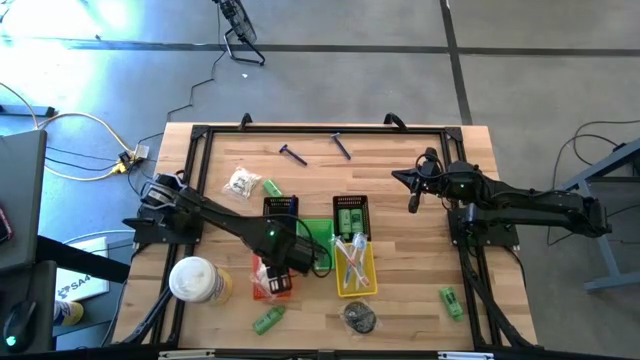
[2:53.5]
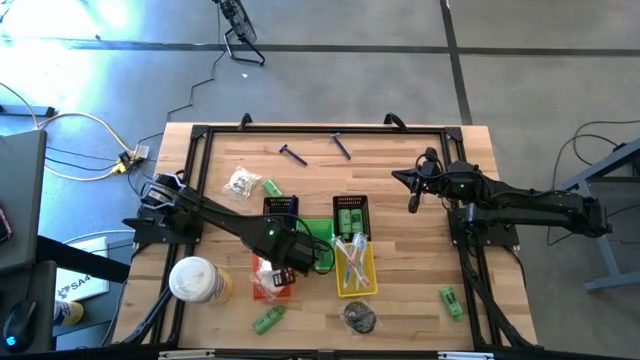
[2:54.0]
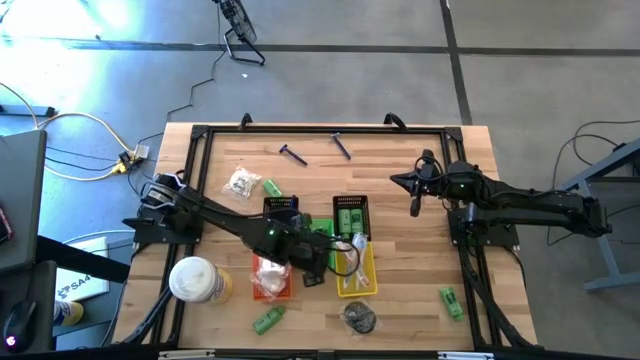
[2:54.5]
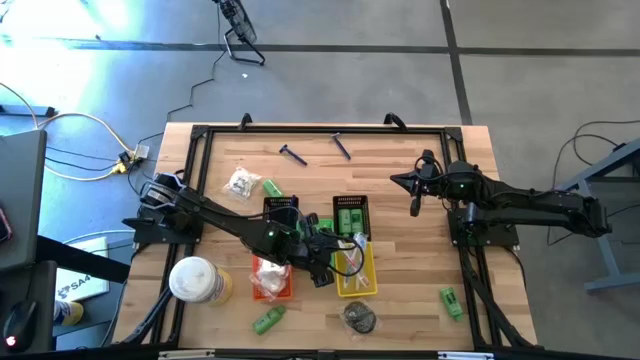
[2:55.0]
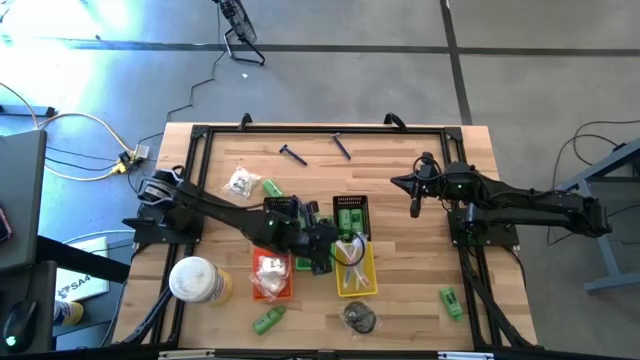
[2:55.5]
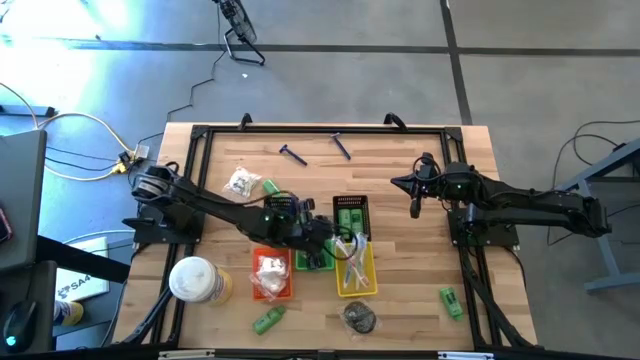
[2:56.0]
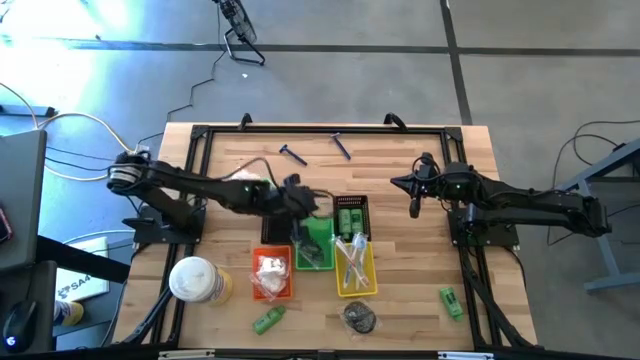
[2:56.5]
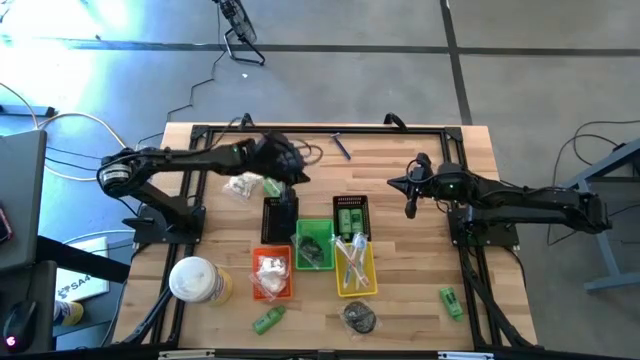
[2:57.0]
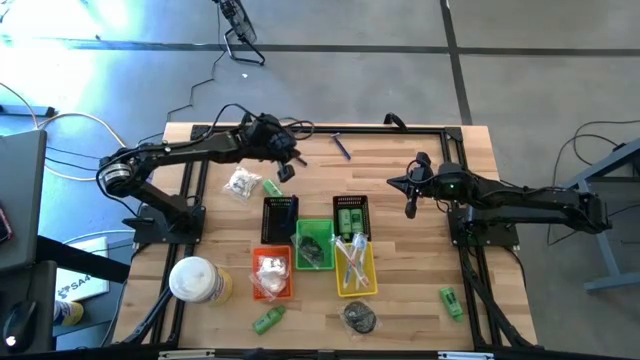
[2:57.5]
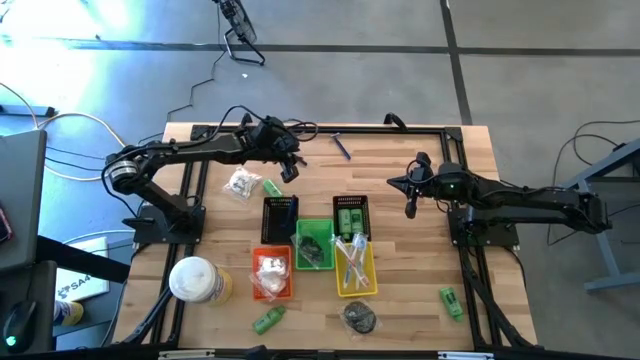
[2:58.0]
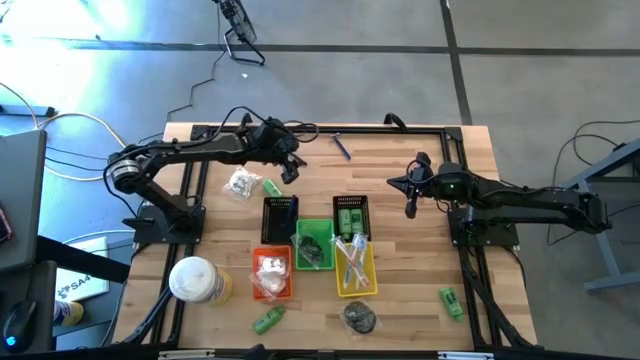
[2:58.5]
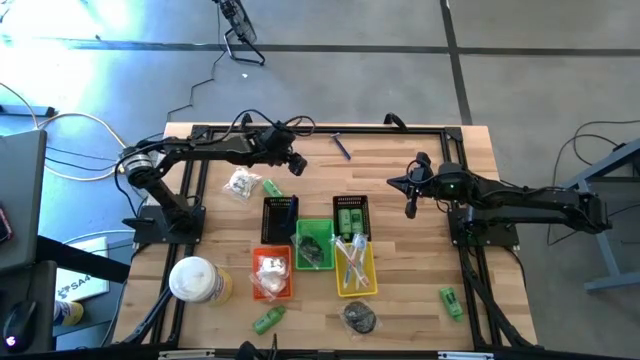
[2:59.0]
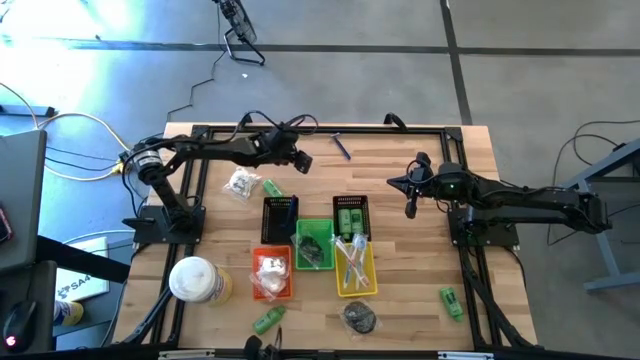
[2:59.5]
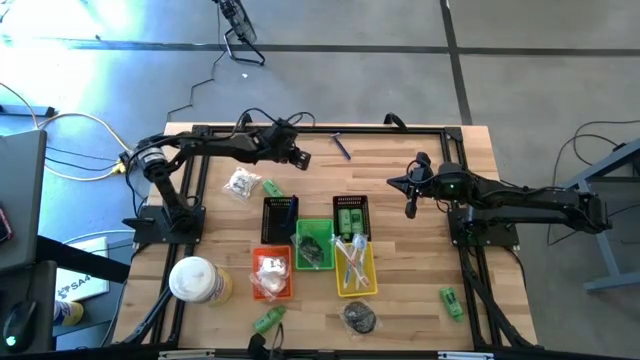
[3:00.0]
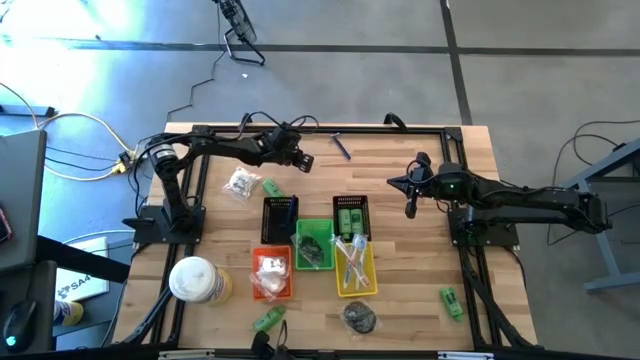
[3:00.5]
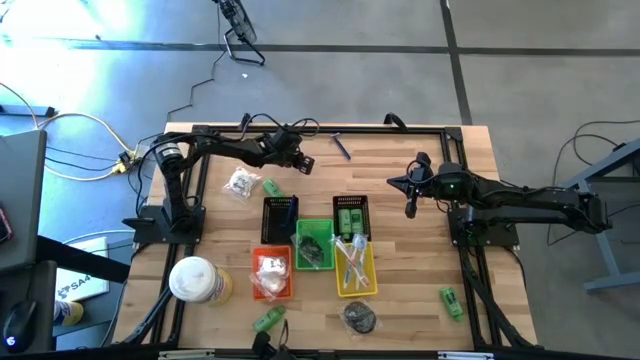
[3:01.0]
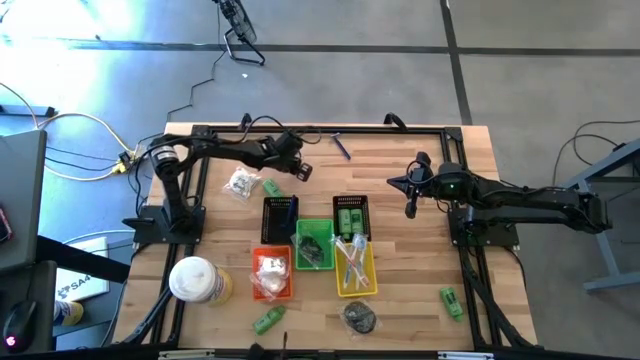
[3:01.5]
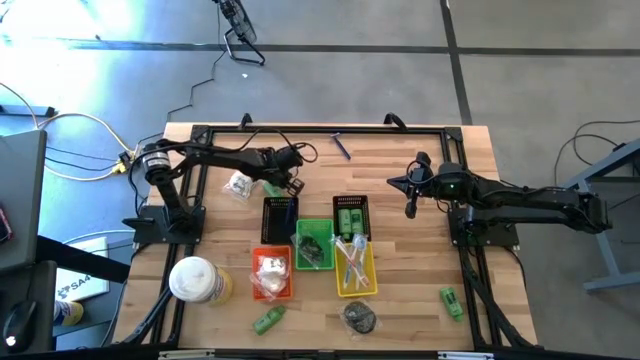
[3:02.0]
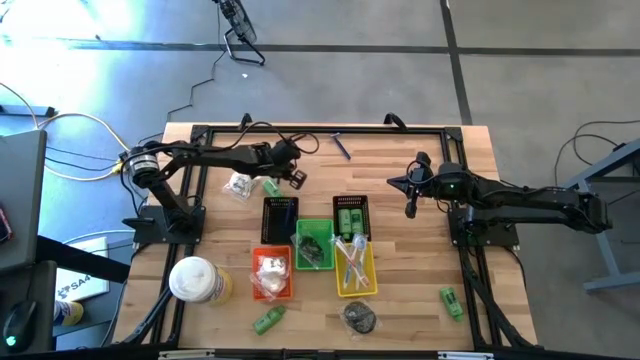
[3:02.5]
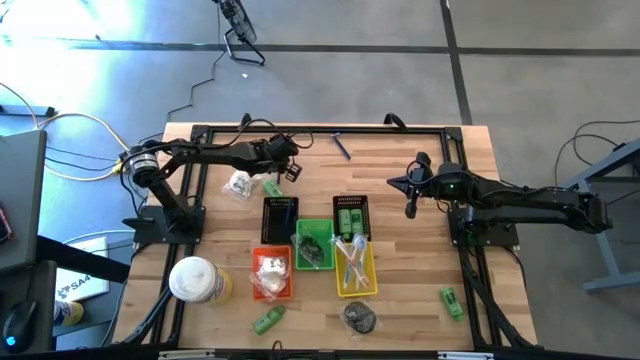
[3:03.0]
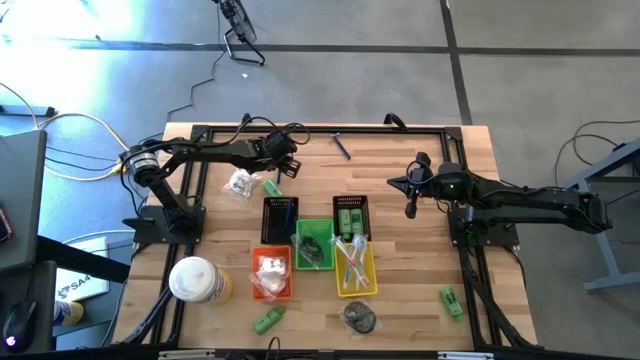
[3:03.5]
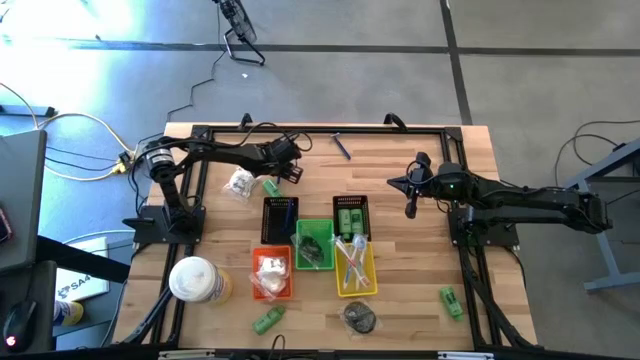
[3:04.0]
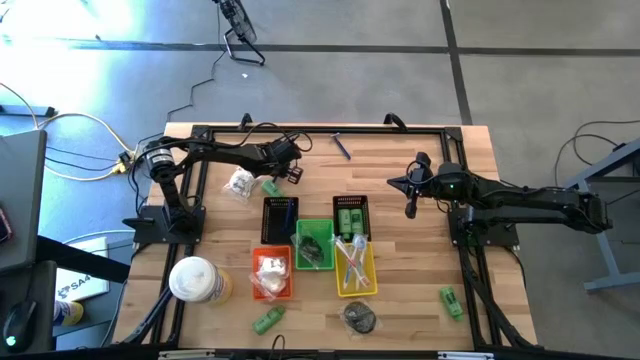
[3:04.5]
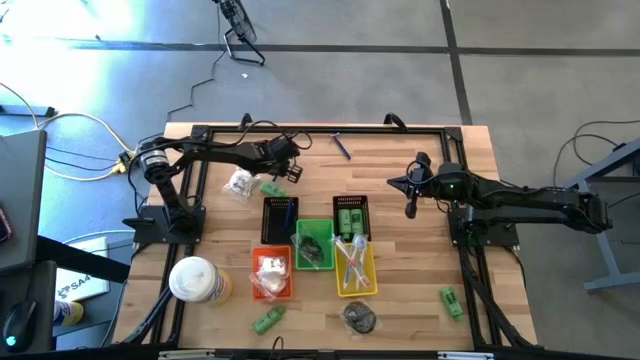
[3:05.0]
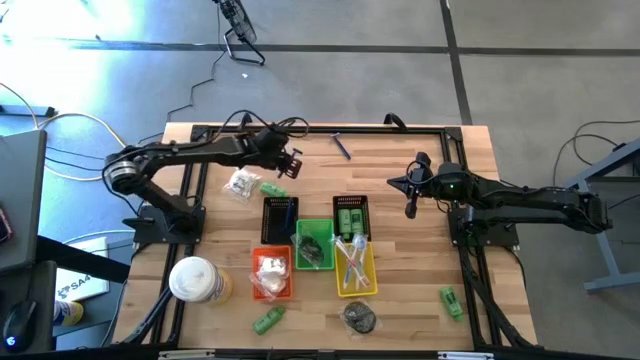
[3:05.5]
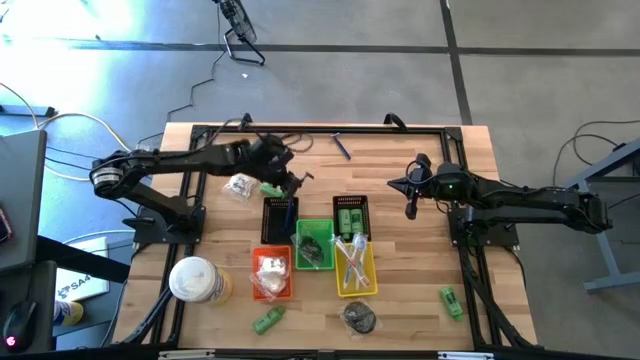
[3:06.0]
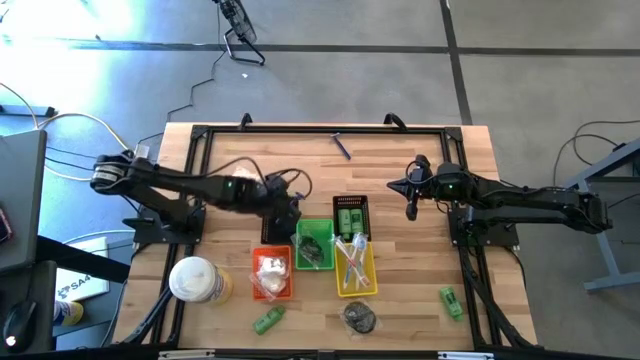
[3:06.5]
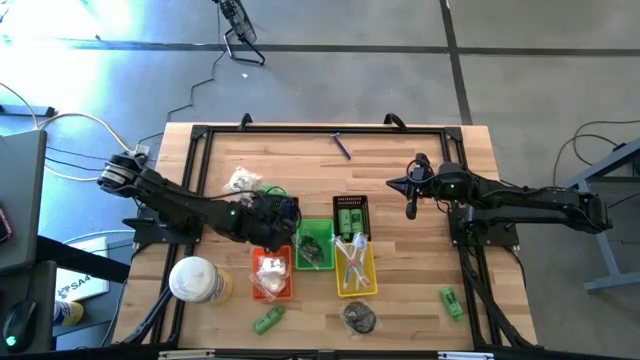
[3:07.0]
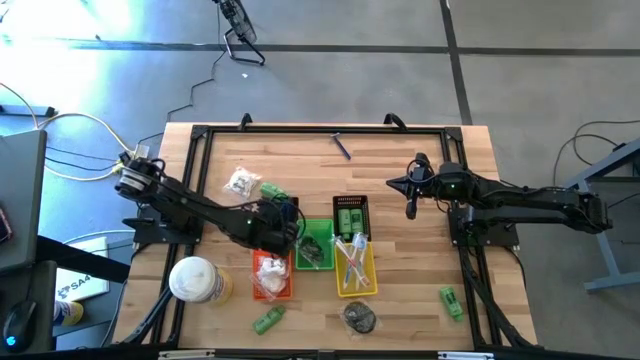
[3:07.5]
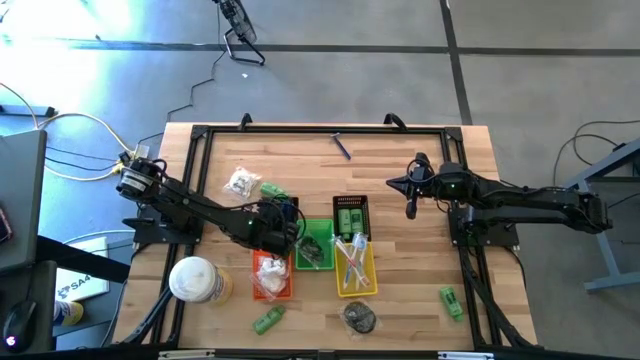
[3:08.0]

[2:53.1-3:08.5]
Task: Pick & Place Travel size toiletries
Put the left blue razor into the left black bin

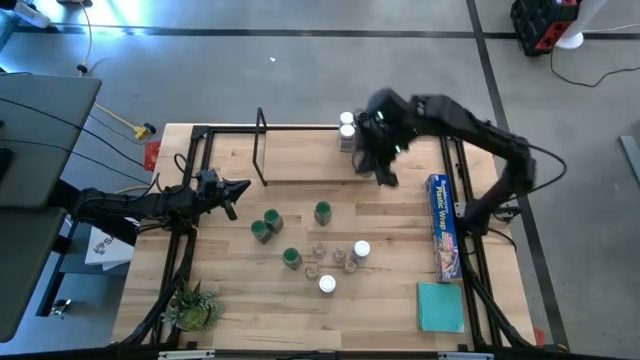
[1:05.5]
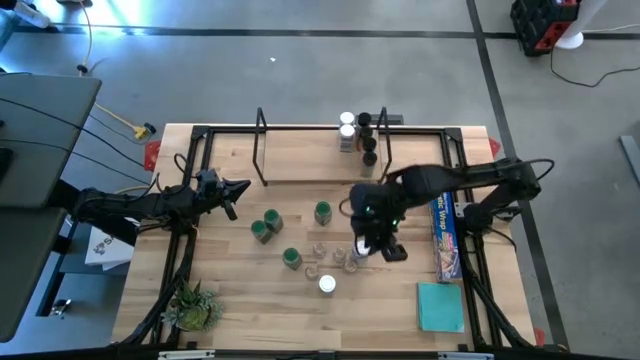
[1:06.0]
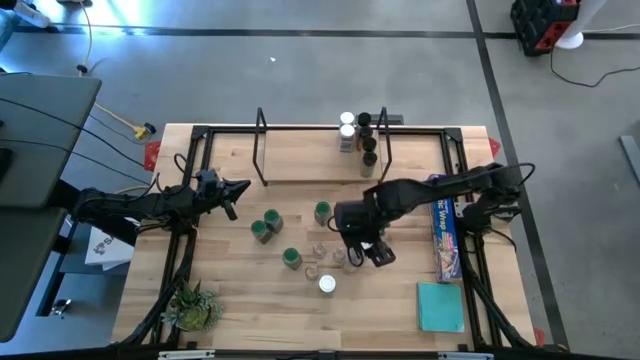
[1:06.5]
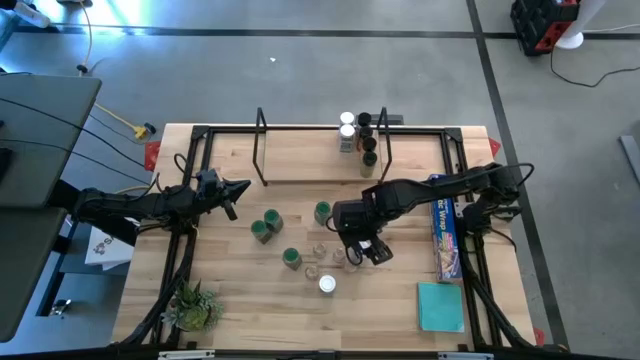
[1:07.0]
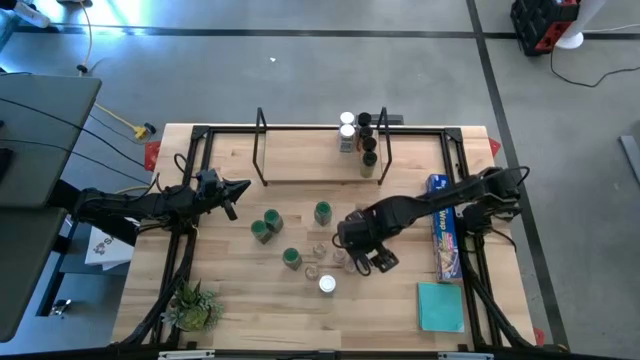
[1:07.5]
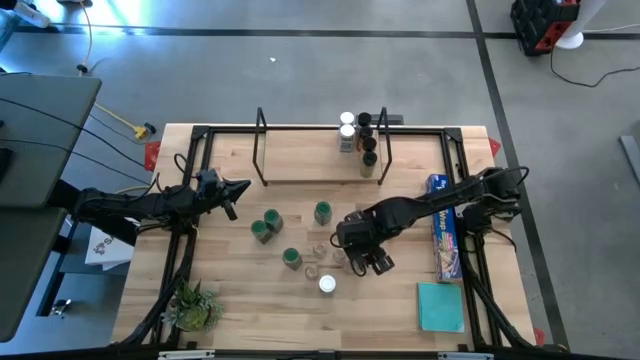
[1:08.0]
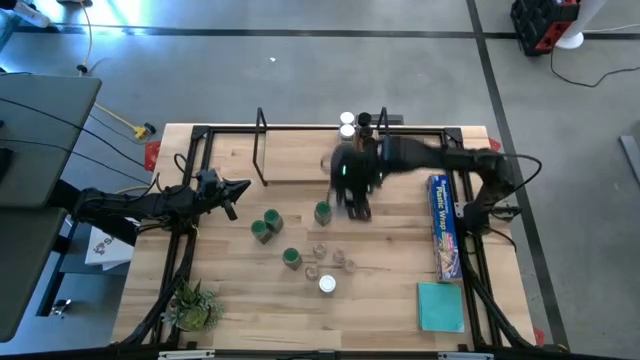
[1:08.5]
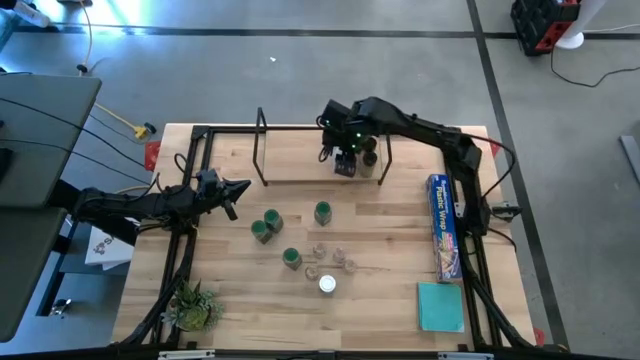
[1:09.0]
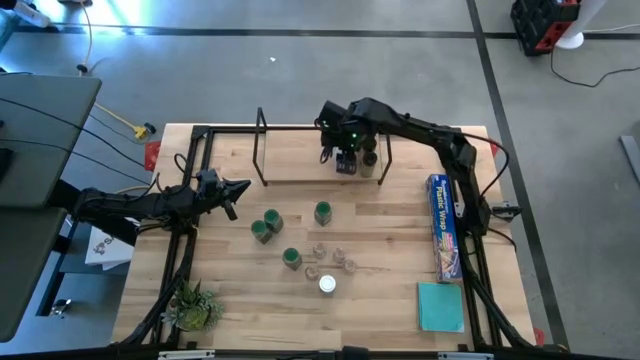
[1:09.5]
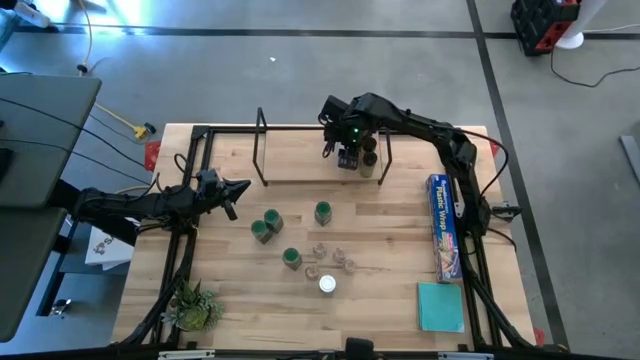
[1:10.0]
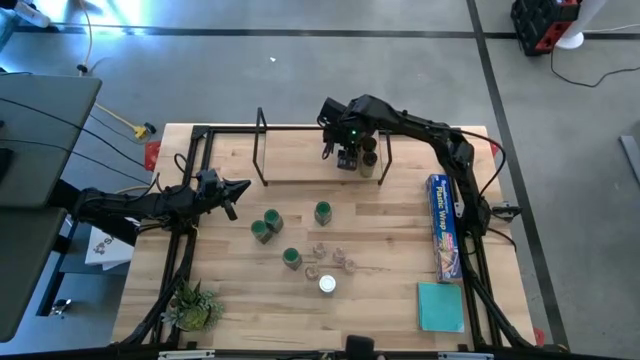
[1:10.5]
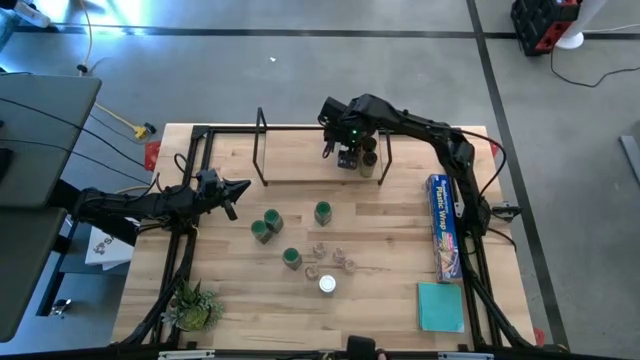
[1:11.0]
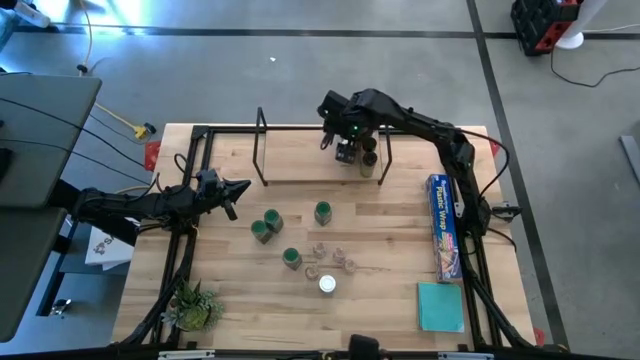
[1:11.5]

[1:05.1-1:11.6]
Task: Shelf spices
Put the top white seasoning bottle on the shelf and align with the other white seasoning bottles
